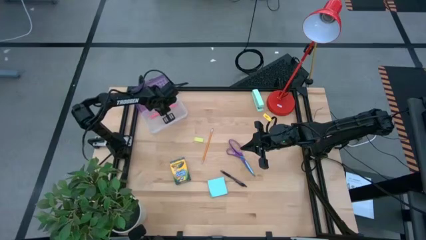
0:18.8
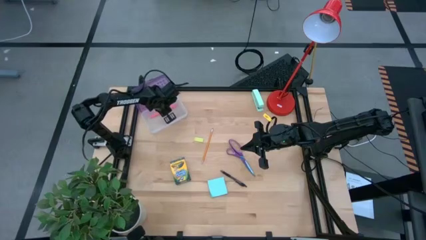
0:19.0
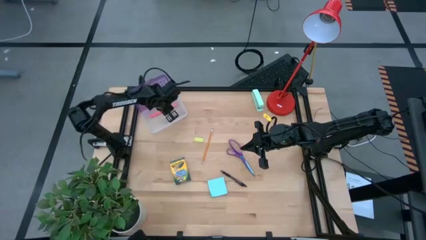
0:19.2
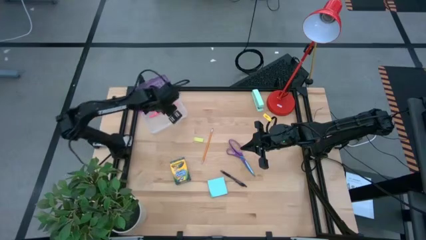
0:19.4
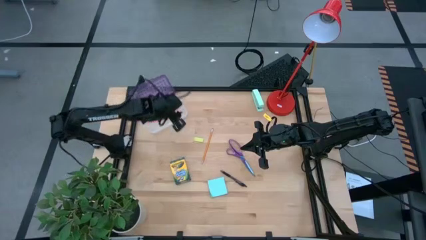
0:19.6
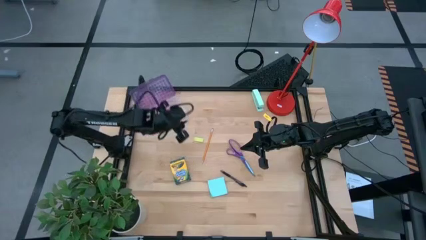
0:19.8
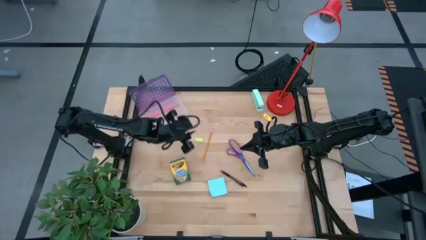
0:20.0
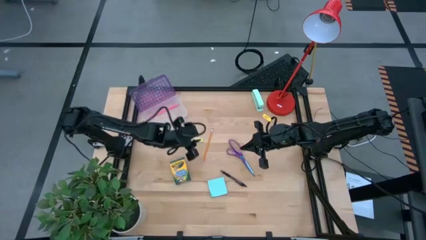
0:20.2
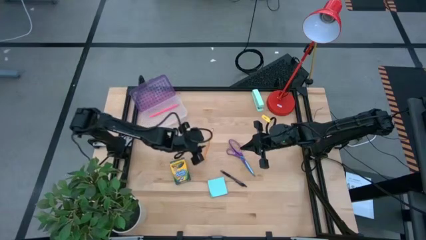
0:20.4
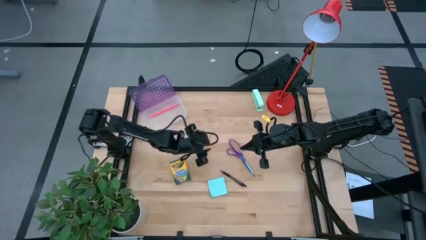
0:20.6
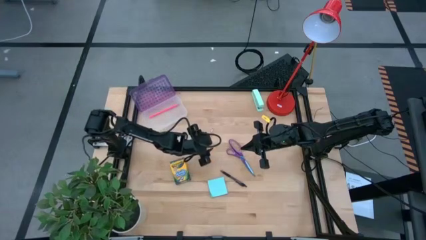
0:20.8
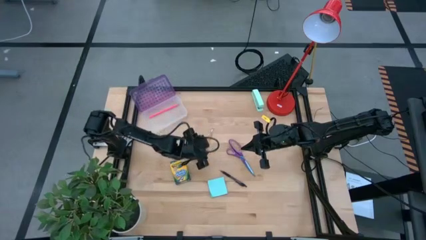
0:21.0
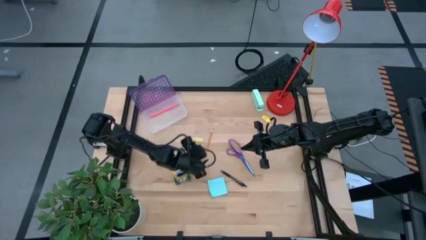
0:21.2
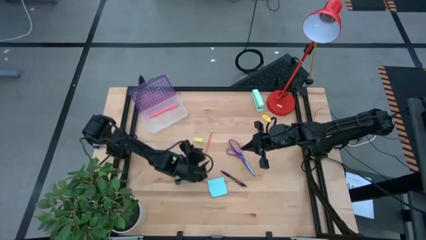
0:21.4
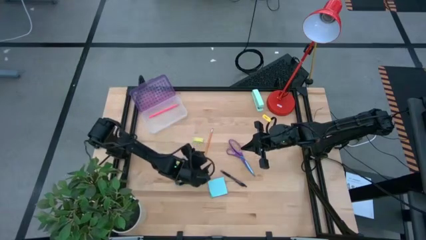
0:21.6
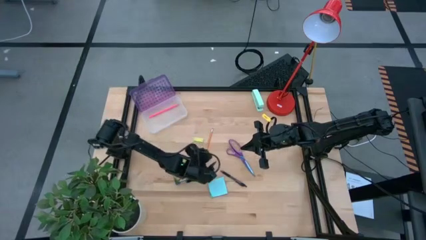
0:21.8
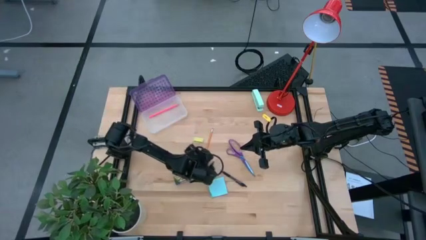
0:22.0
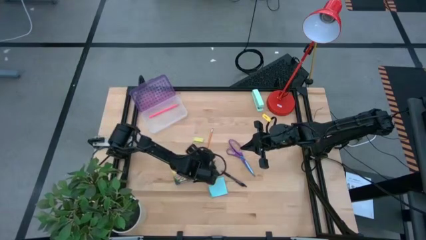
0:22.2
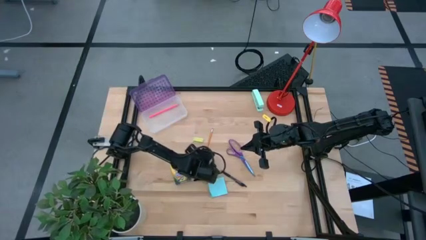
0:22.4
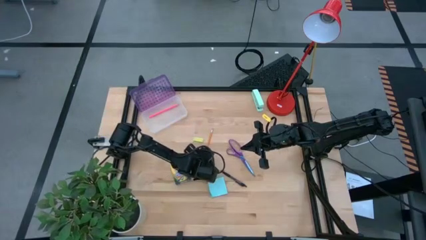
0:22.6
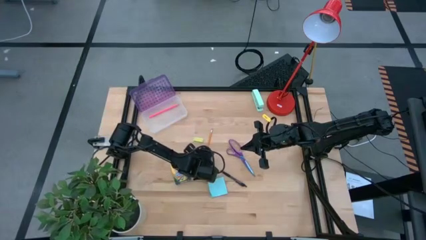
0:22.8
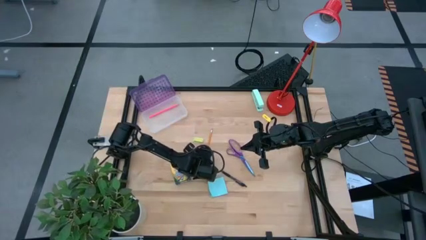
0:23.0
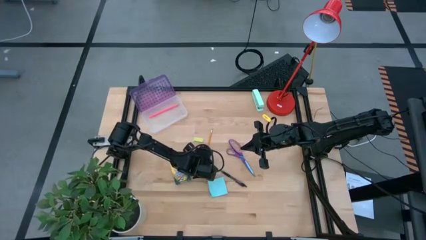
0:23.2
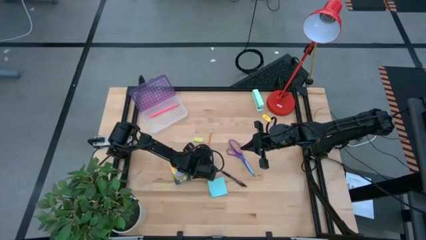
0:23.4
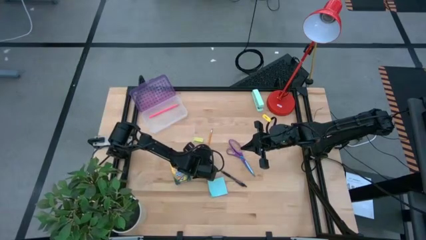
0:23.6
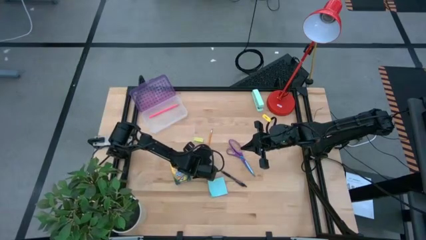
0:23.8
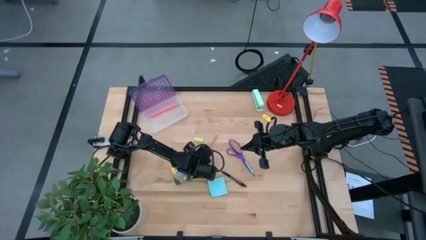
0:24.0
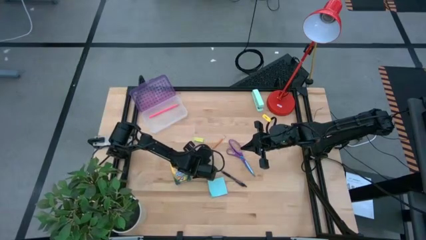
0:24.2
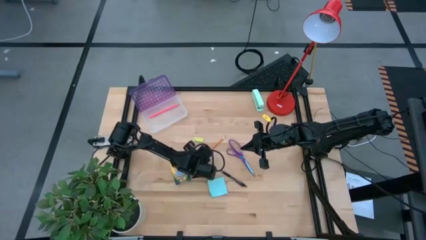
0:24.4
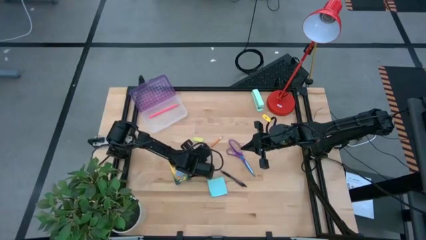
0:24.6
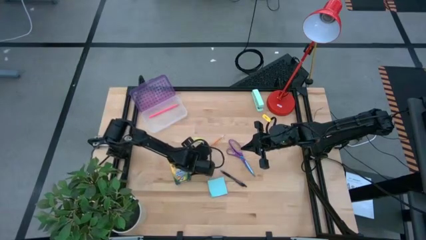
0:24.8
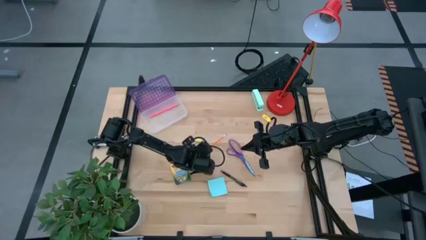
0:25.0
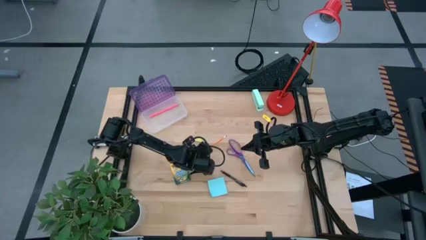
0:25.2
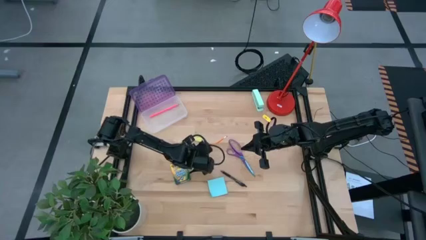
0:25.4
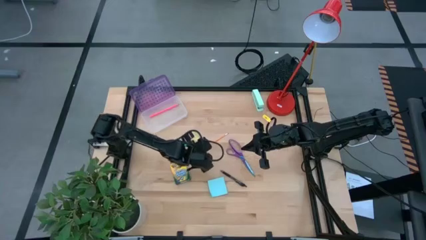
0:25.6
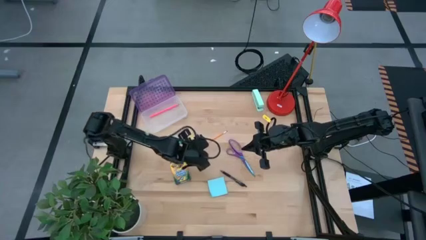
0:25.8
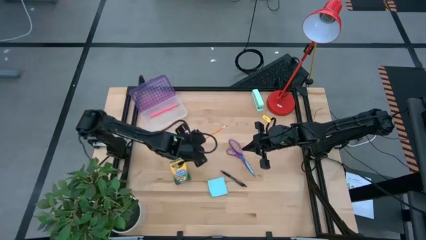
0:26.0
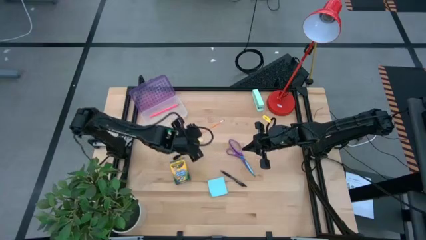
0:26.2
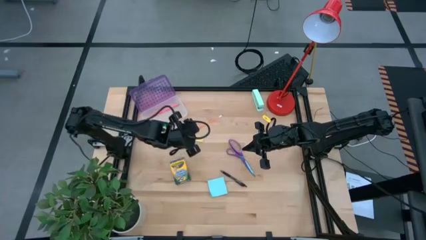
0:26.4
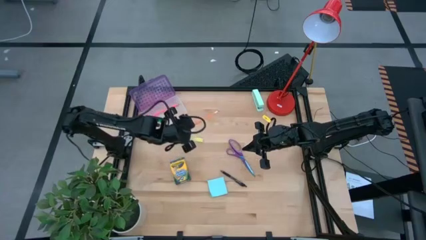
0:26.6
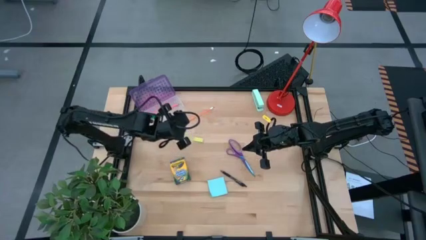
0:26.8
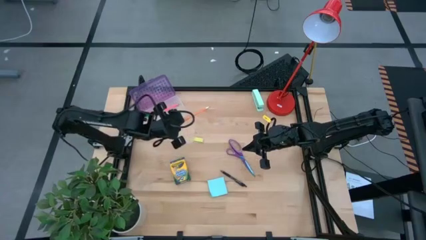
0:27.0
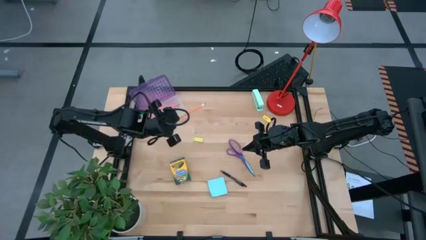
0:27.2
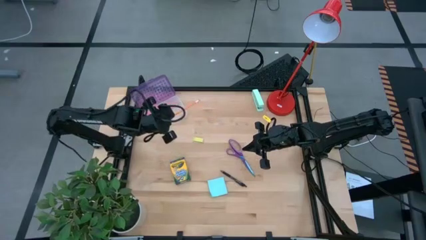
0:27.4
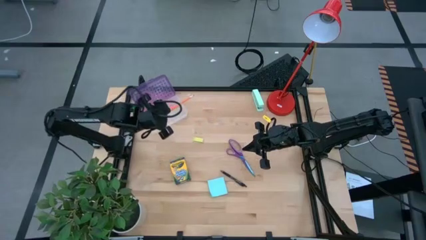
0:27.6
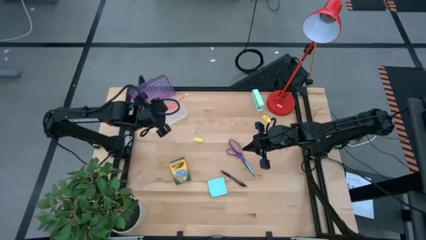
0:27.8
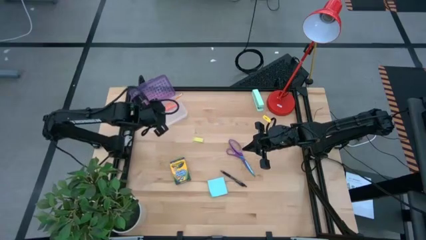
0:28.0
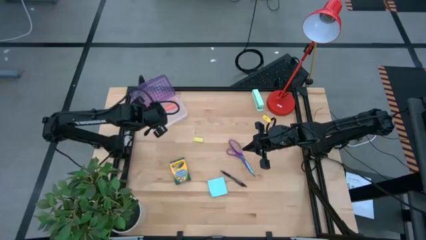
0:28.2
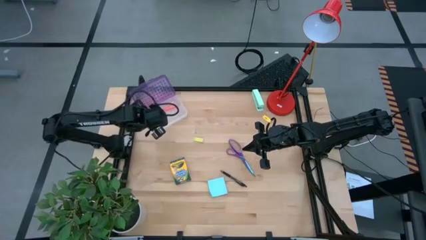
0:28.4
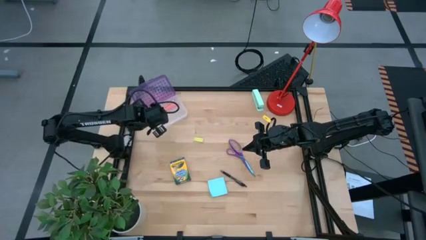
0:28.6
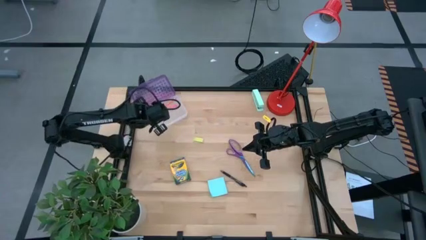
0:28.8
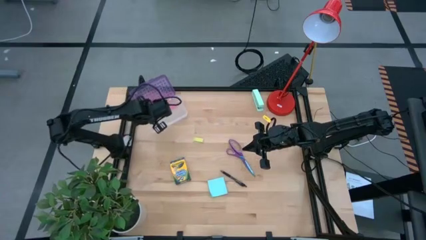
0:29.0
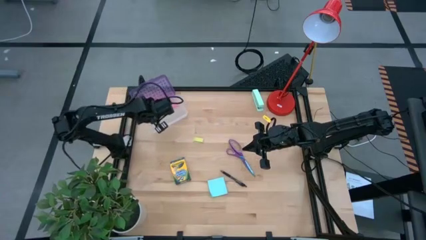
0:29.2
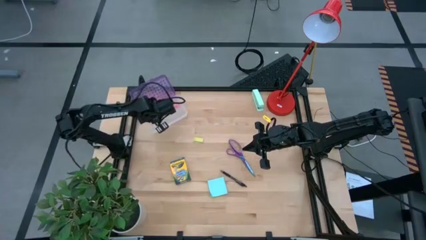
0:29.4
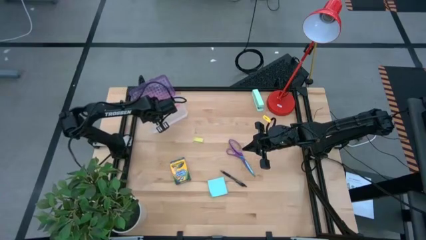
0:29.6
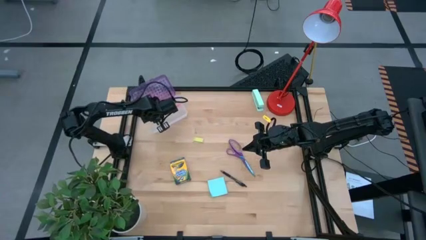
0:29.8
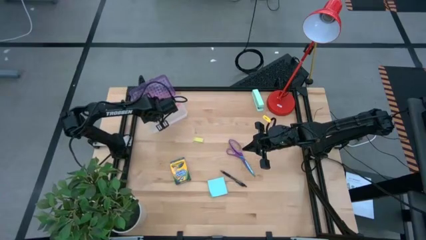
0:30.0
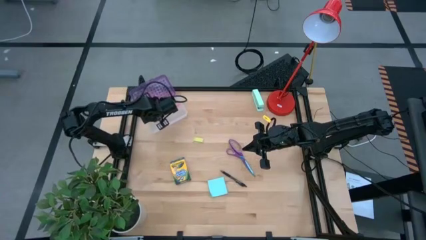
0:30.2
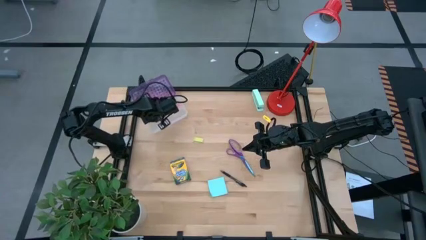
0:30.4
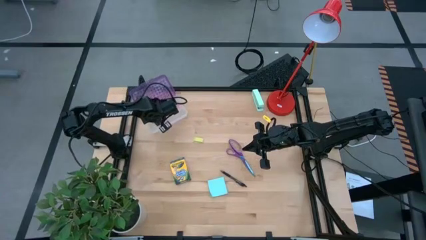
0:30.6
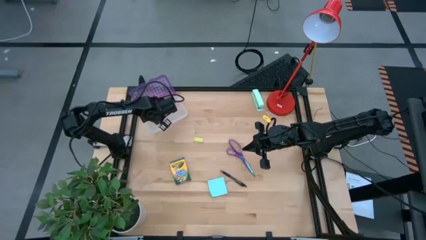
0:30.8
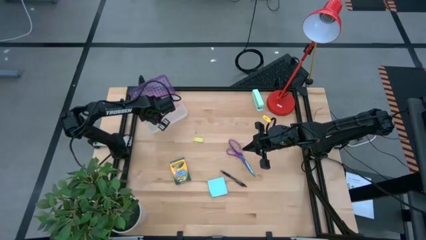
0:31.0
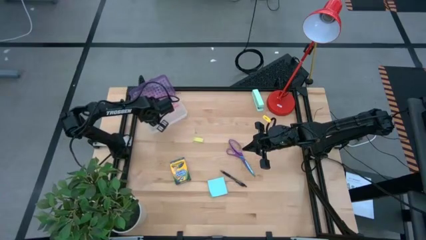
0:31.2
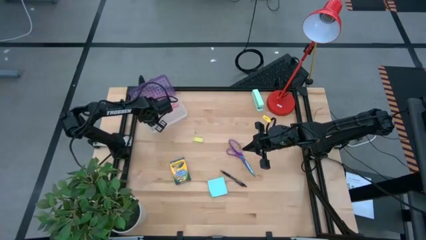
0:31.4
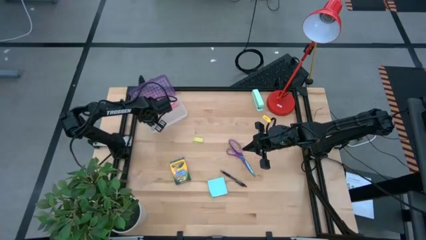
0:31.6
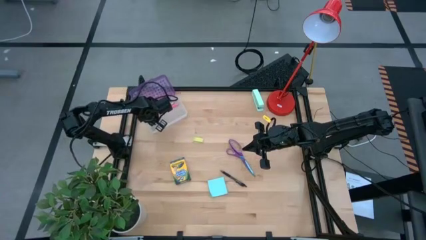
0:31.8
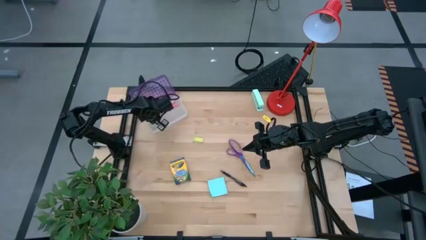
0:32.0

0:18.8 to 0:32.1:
Task: Pack school essentials
Put the orange pencil into the purple supply box
